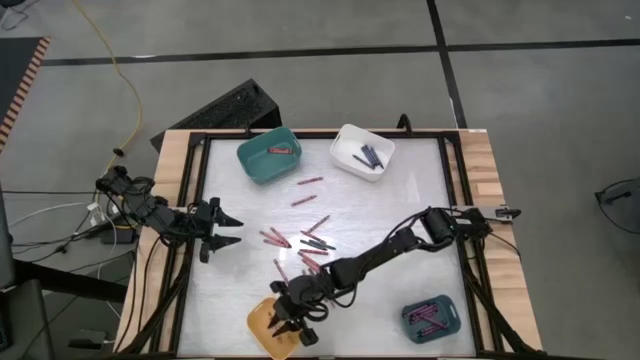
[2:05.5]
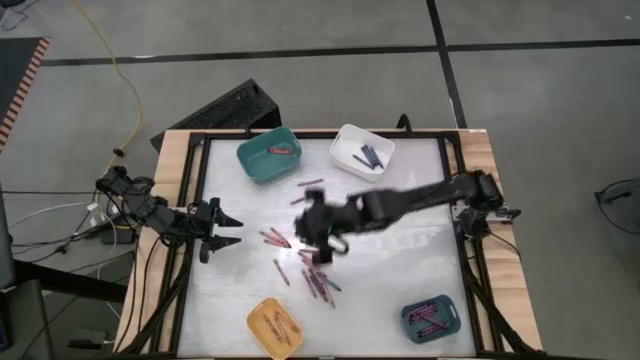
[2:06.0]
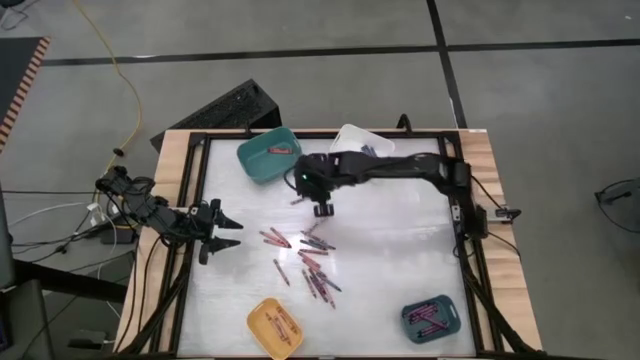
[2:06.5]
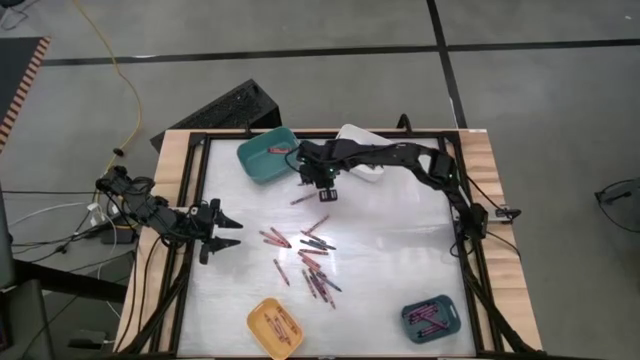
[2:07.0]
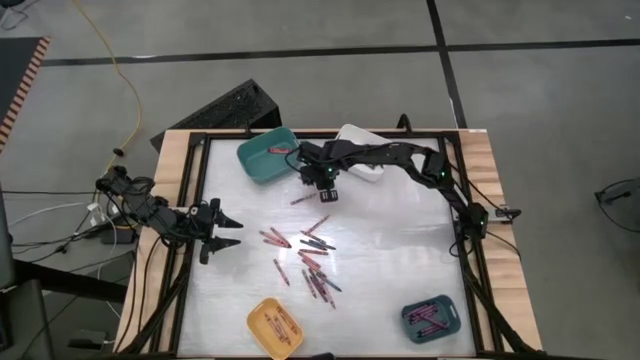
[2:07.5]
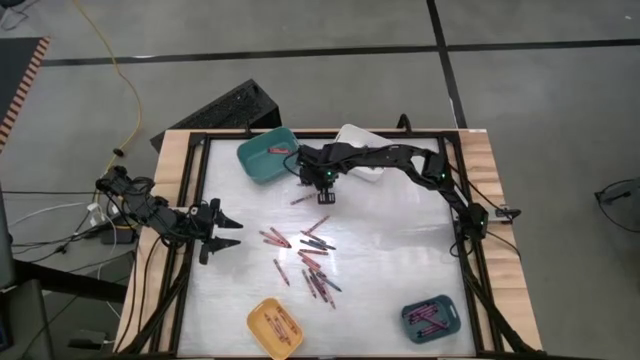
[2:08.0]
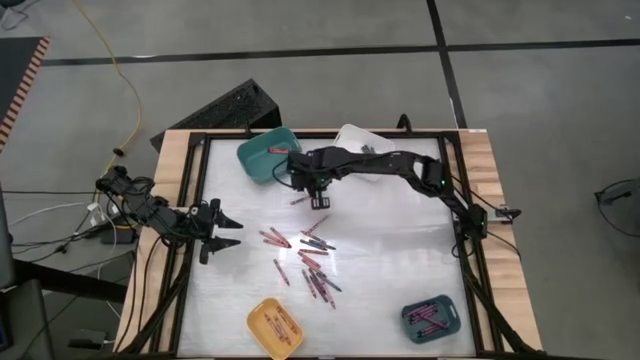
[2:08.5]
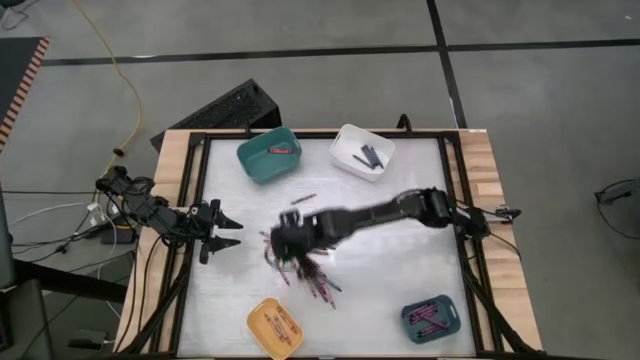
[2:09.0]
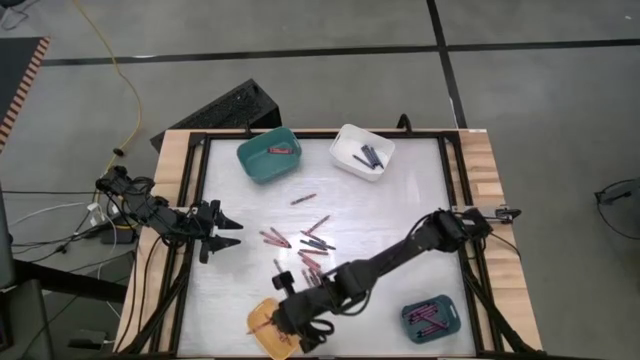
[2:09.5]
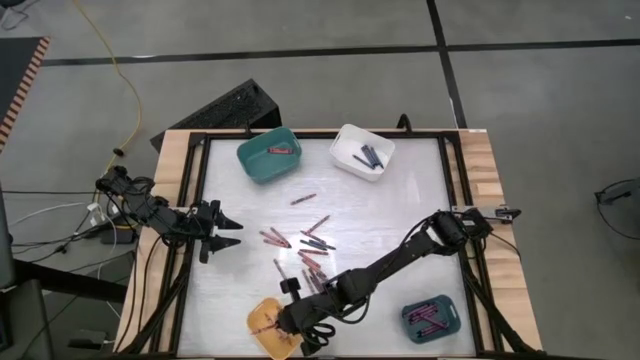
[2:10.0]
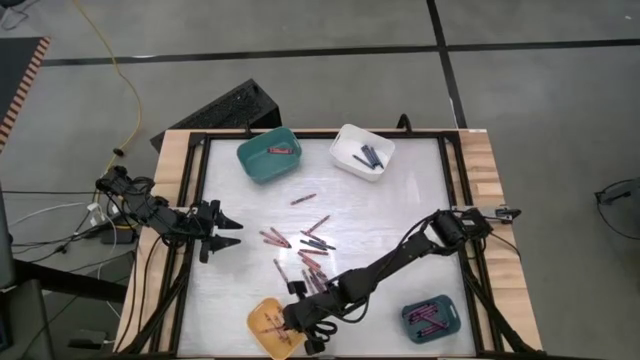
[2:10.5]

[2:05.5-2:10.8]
Task: Sort crayons
Put the pink crayon into the yellow bin

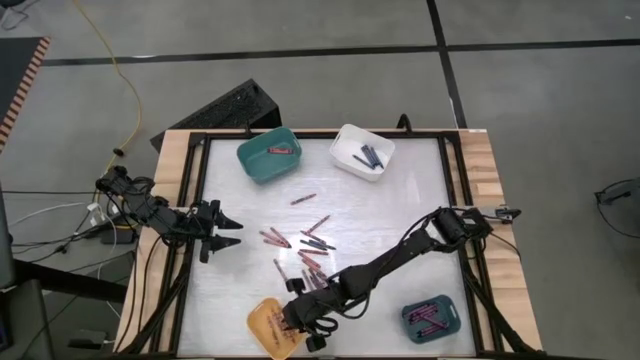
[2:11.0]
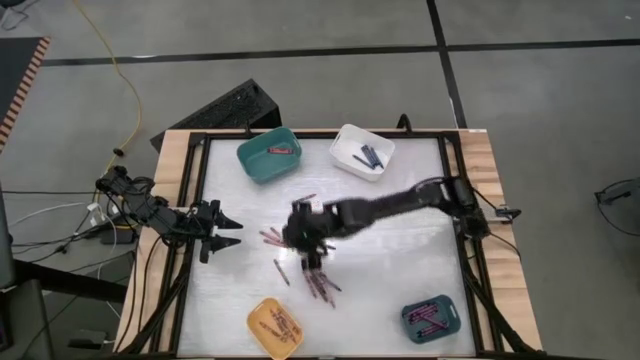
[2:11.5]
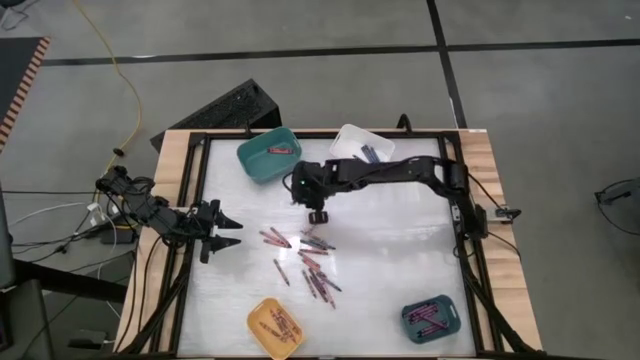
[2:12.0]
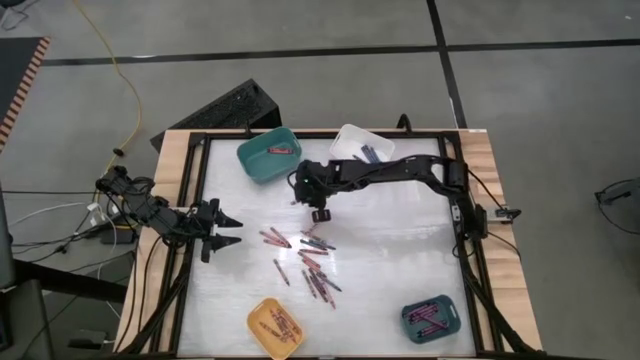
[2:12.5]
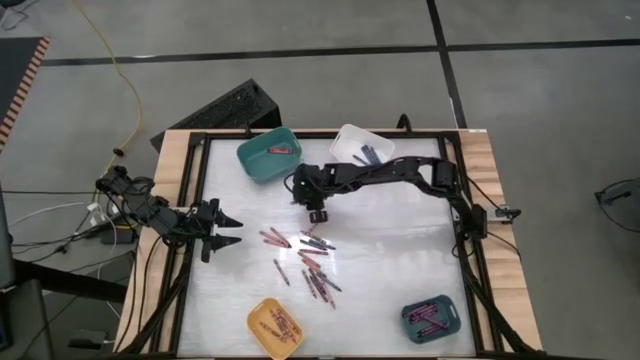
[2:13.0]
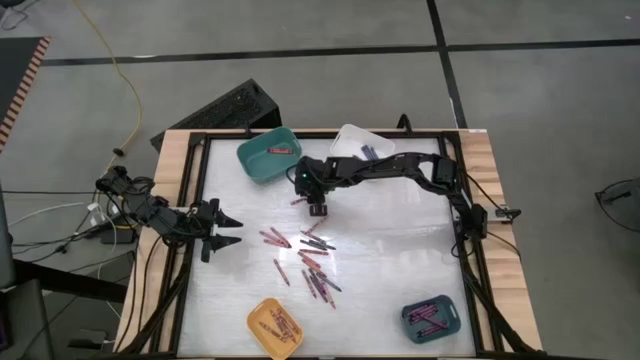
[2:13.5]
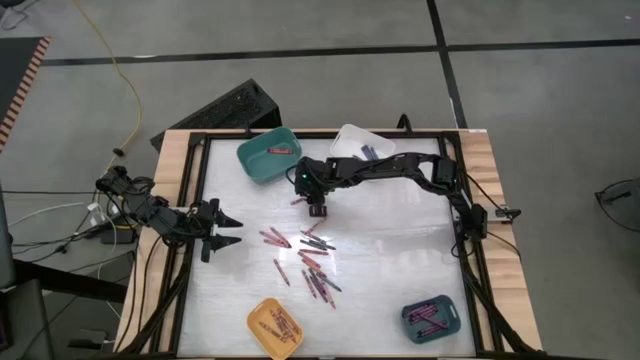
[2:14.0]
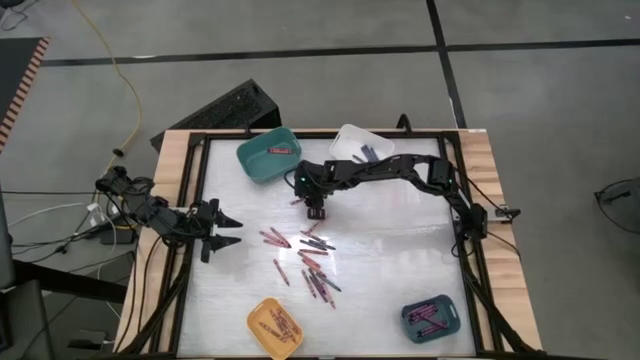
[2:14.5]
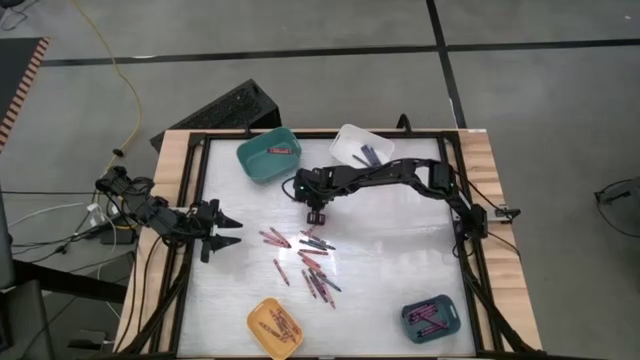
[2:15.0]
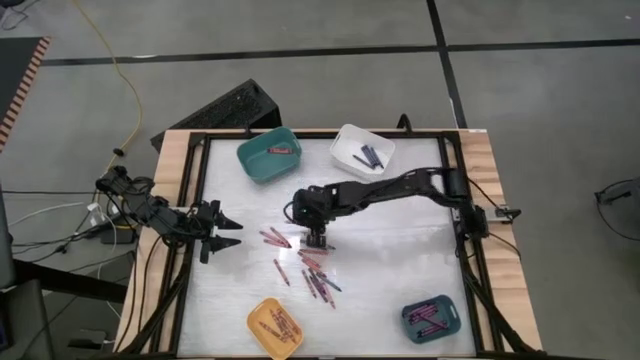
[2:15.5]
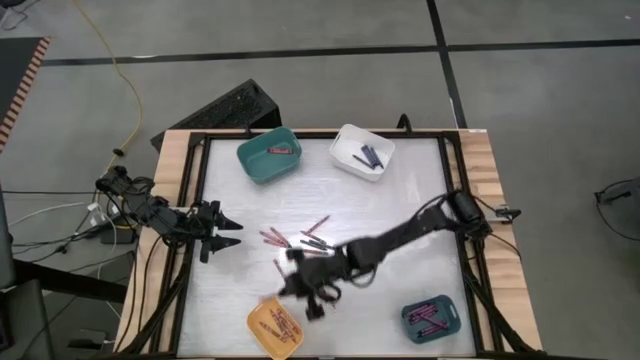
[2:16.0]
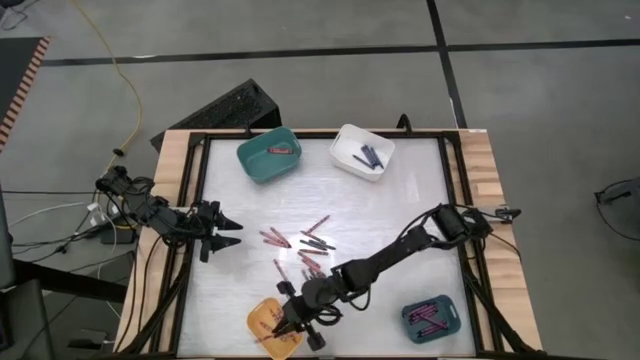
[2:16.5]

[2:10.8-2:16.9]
Put the pink crayon into the yellow bin

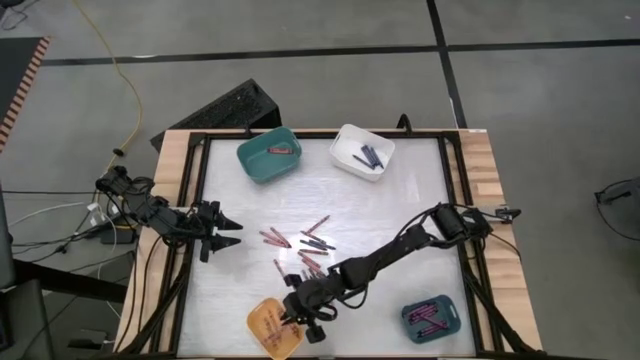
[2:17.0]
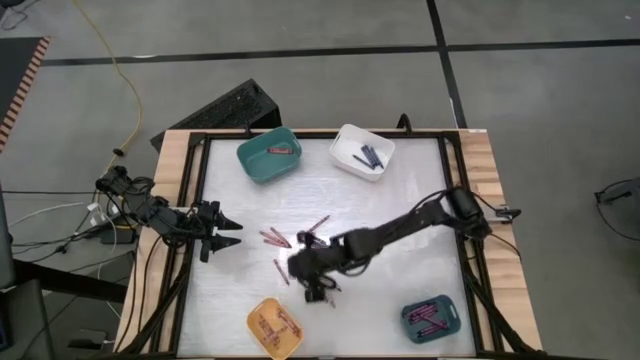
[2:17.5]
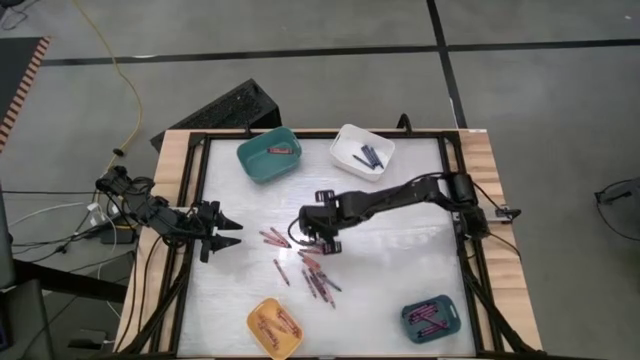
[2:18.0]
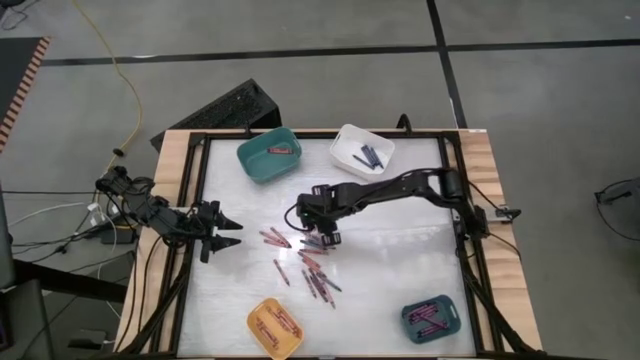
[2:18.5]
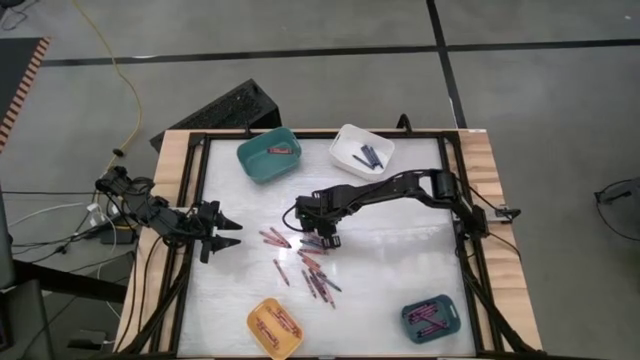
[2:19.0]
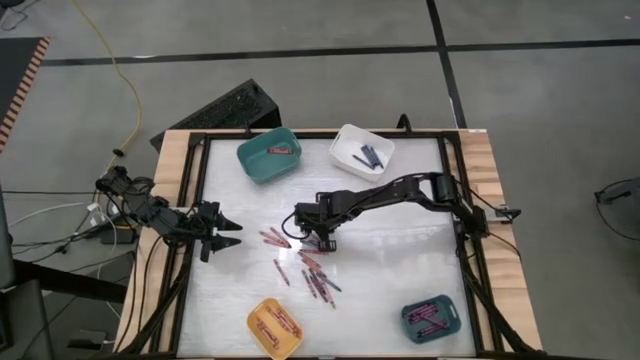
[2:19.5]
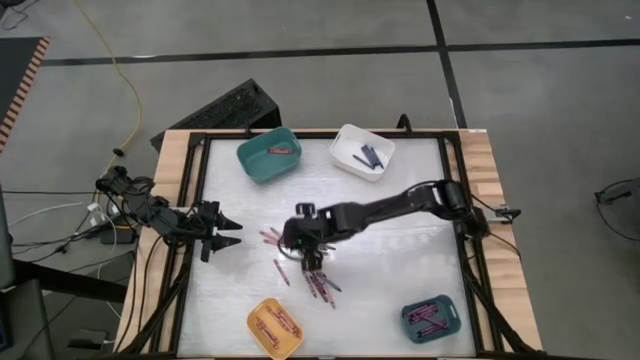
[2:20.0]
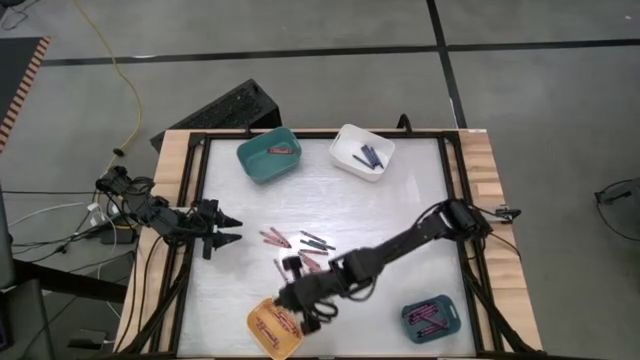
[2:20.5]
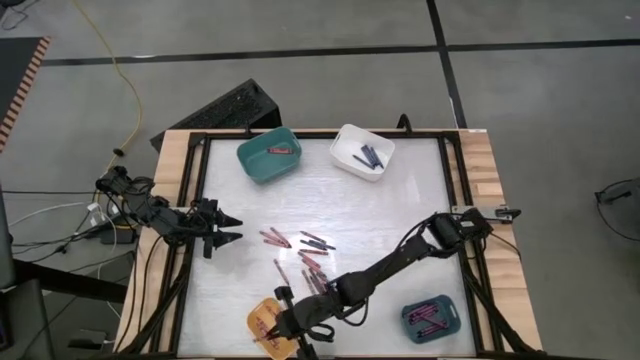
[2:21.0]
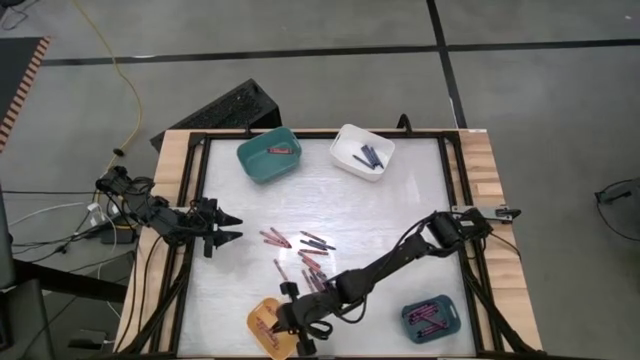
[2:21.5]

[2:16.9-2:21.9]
Put the pink crayon into the yellow bin

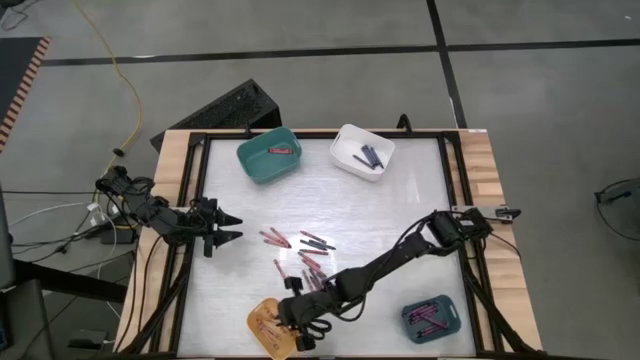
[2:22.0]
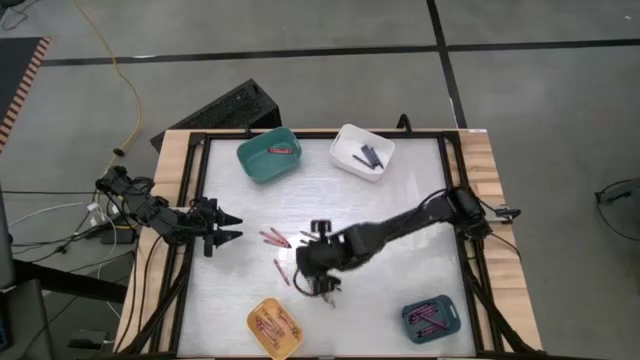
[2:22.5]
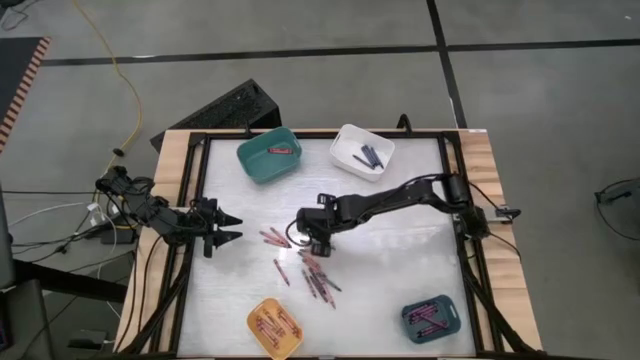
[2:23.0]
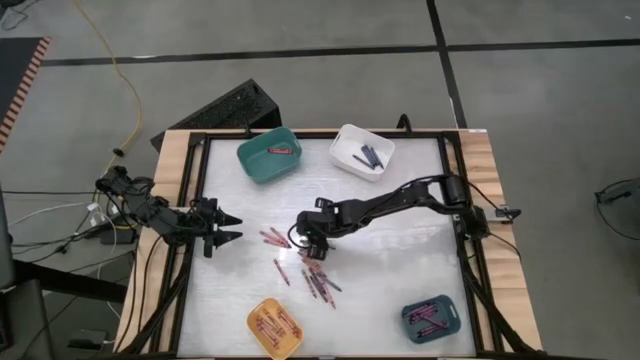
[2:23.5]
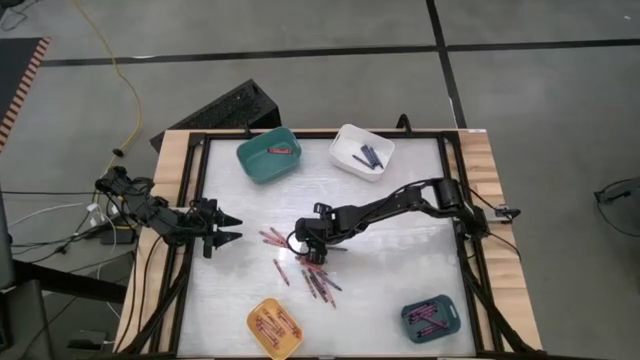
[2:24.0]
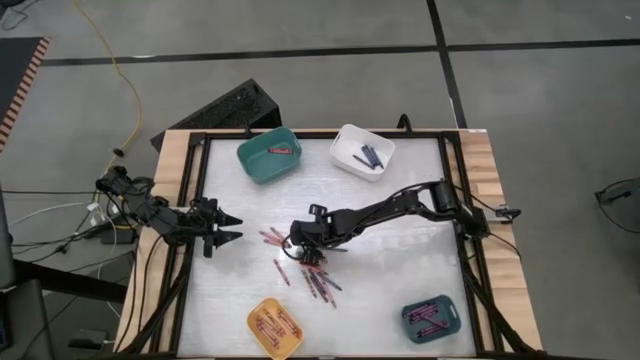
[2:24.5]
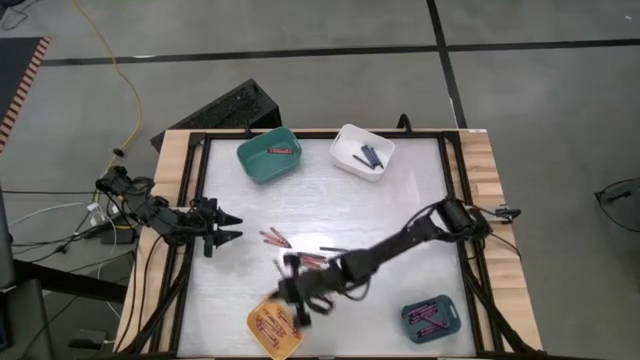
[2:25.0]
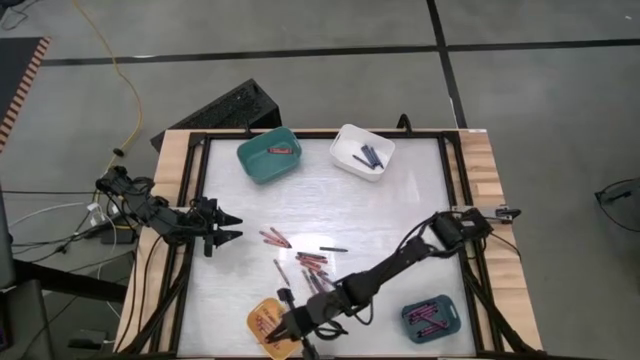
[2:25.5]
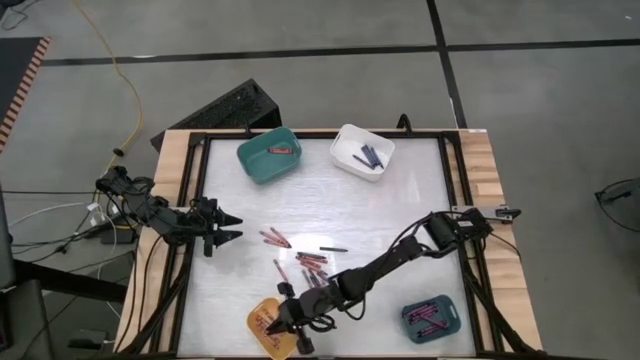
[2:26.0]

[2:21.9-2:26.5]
Put the pink crayon into the yellow bin
